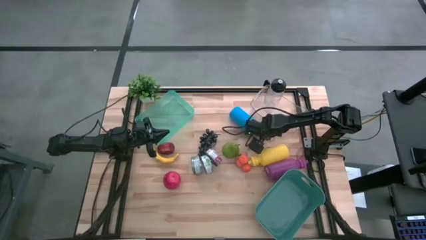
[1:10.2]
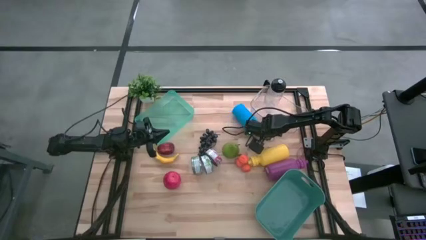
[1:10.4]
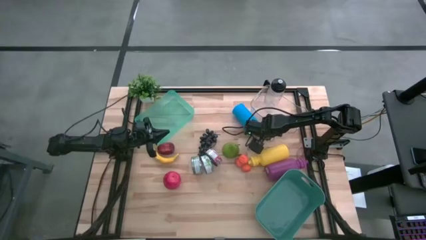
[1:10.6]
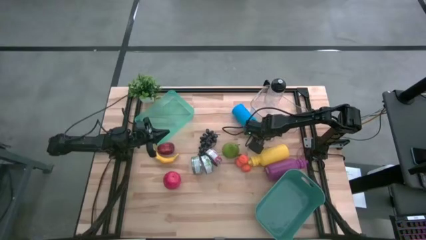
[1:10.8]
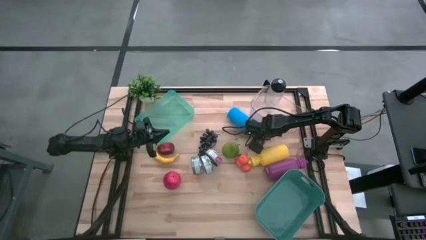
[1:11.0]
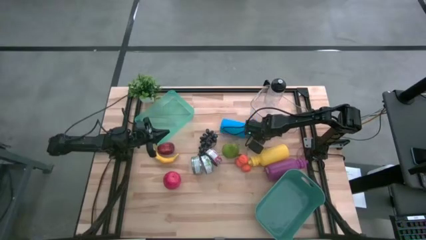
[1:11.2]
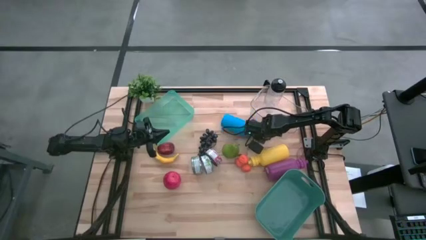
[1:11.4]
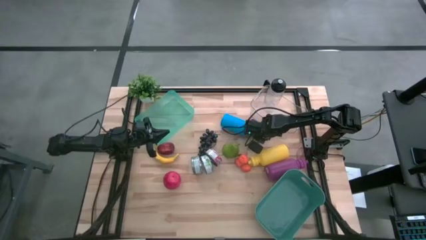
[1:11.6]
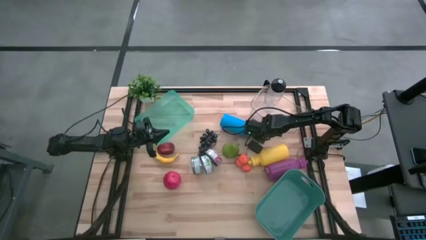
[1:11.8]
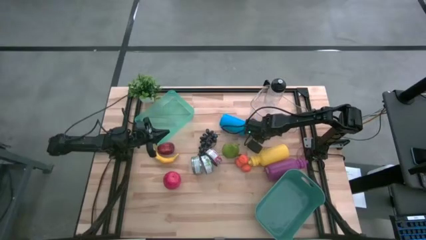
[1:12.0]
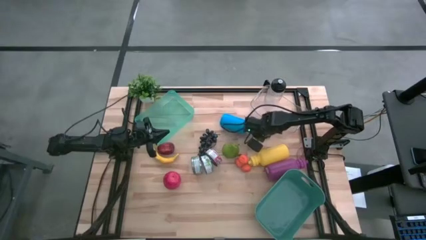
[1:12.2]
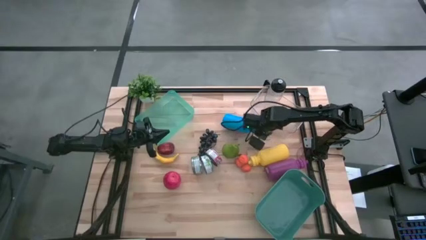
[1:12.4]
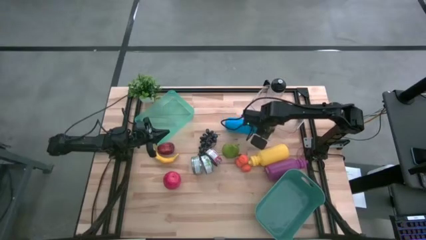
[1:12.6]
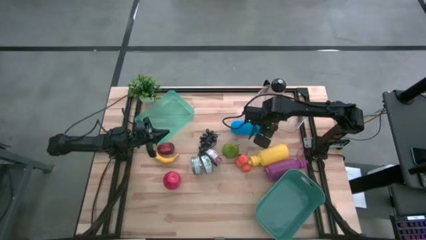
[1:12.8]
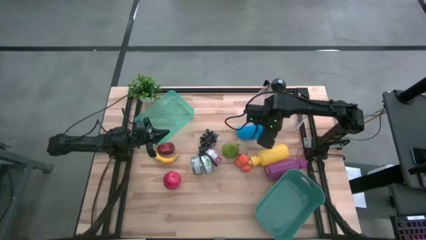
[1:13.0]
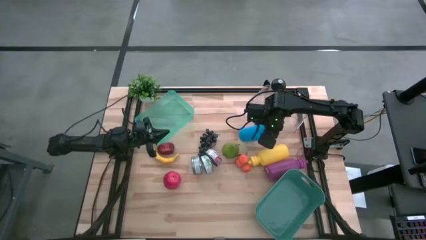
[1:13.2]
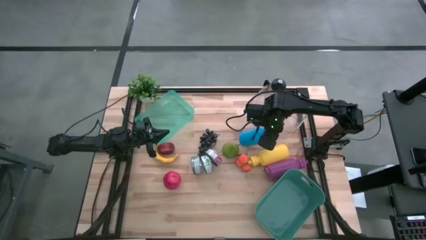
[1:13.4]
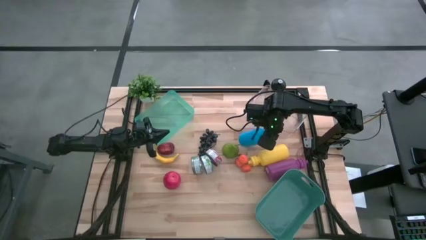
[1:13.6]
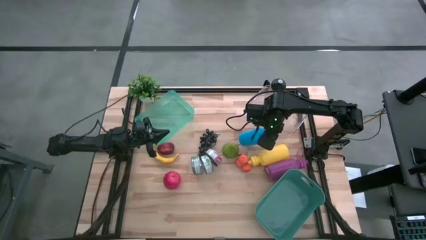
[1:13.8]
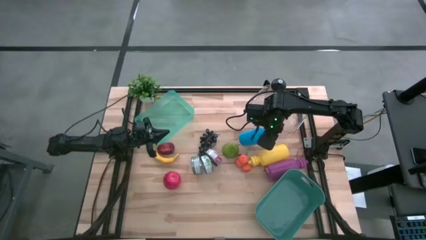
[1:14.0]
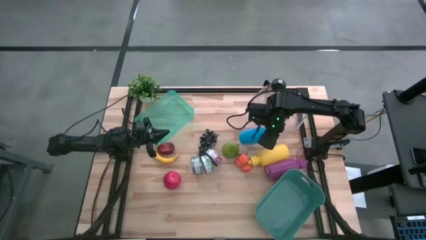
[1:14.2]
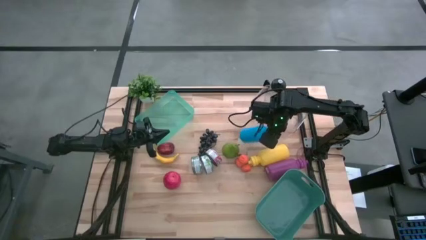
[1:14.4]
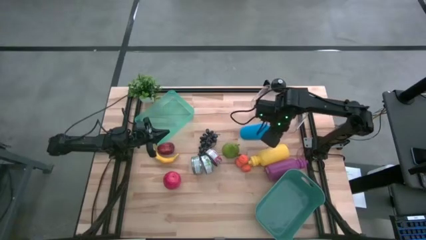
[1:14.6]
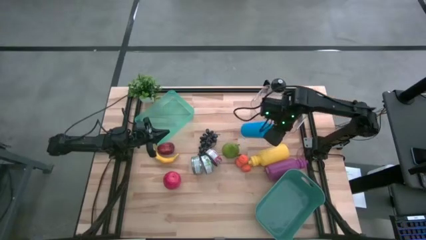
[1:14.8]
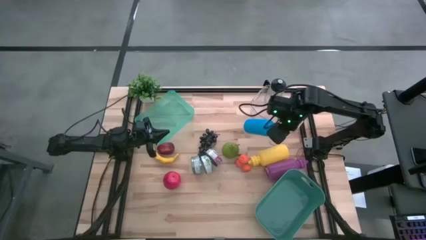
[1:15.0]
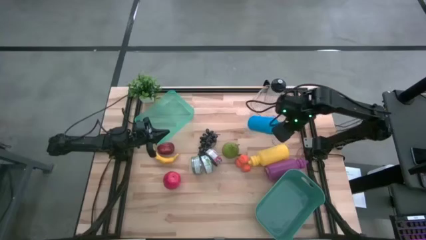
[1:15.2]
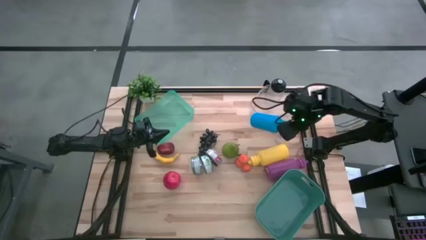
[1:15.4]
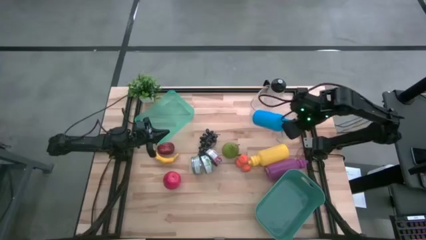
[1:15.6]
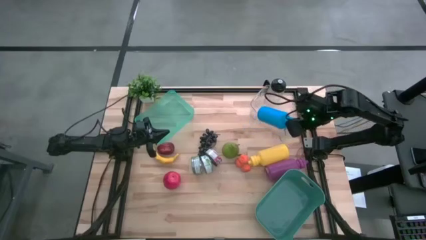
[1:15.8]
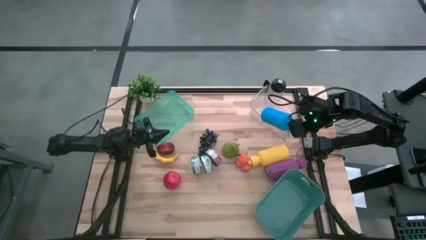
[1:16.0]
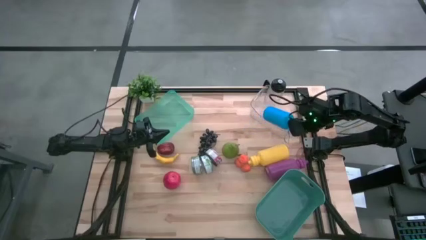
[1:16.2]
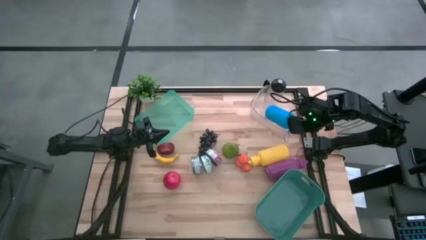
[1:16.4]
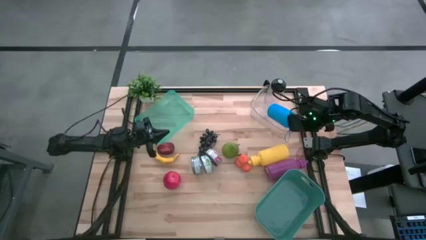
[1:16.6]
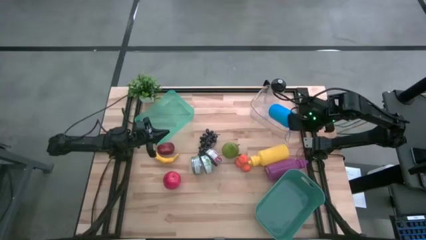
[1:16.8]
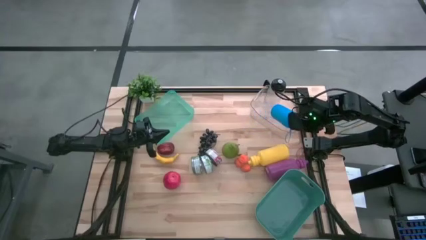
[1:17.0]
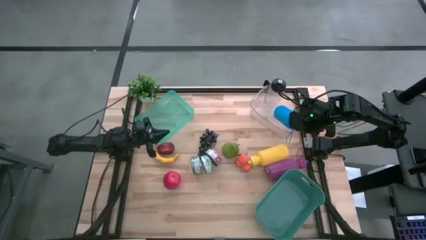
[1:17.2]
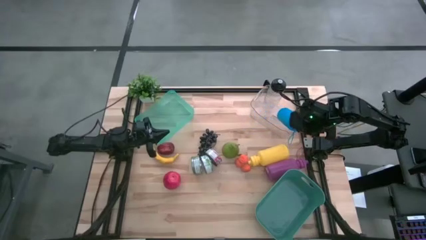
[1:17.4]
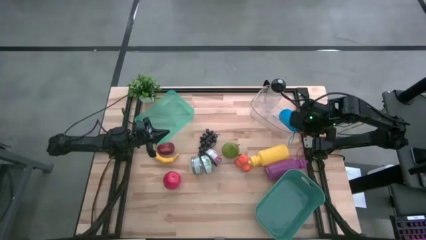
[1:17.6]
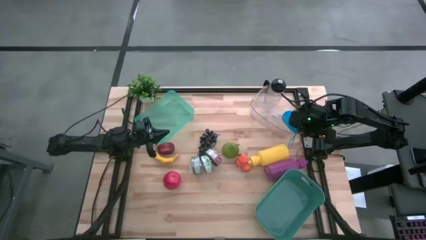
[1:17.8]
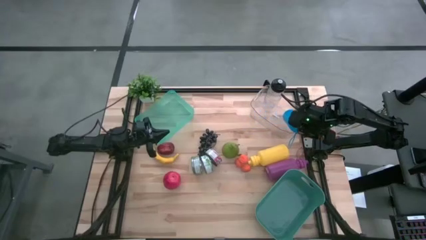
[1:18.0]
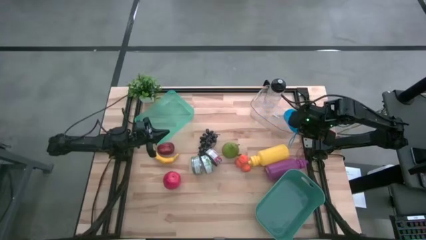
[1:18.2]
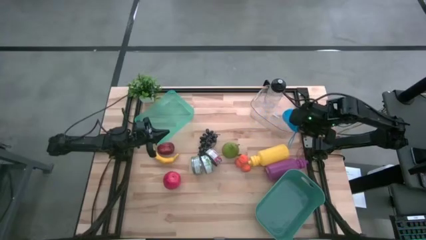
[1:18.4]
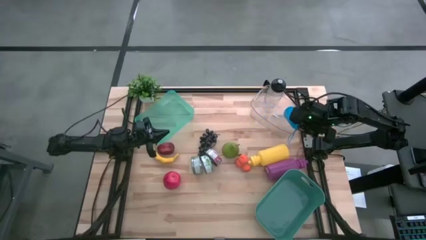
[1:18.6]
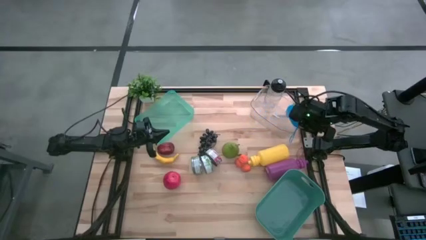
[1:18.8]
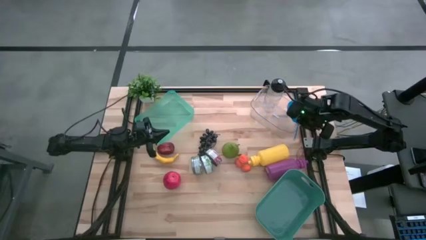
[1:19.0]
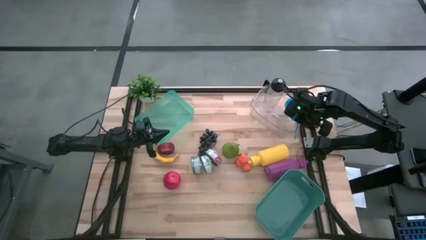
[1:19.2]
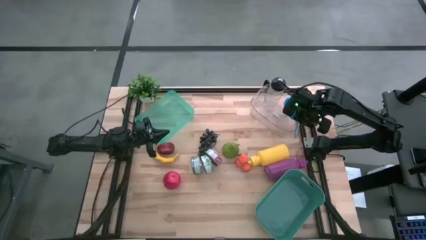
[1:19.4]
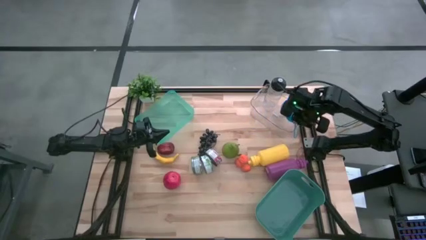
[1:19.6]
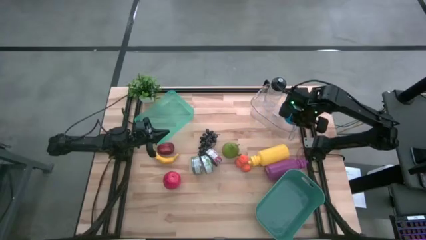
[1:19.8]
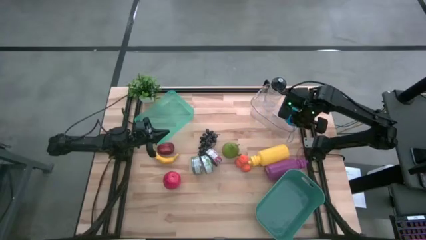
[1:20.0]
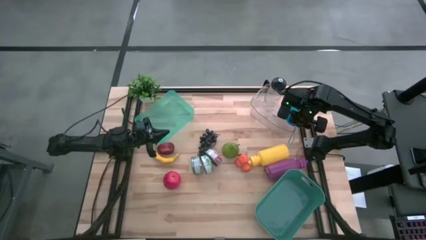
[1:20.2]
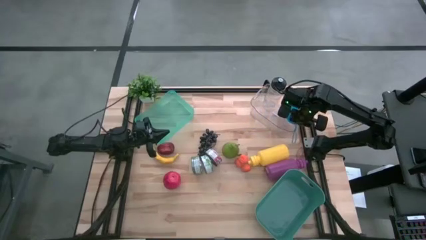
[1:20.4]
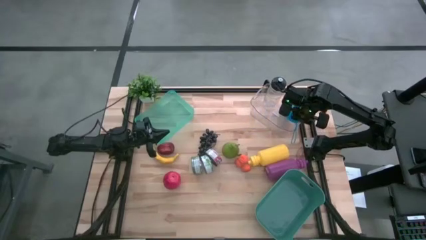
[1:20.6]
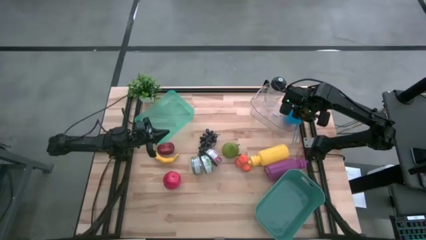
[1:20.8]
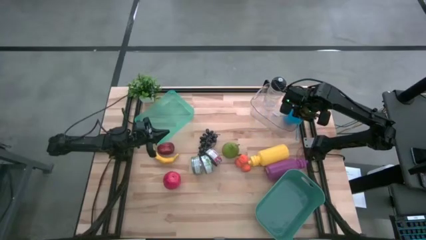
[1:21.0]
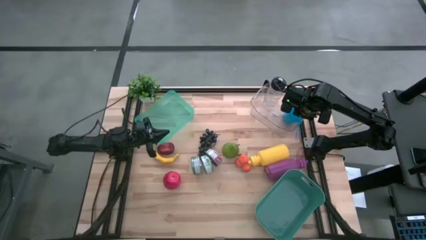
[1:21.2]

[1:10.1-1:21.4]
Task: Pick & Place Food Item
Put the blue water bottle into the transparent bin

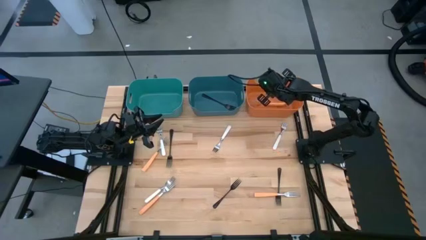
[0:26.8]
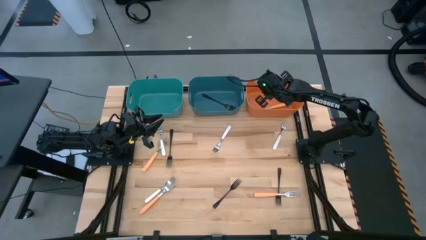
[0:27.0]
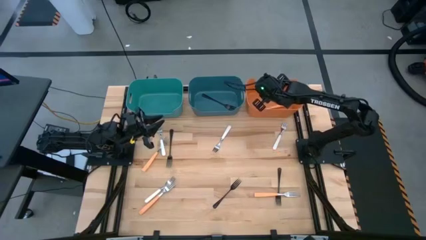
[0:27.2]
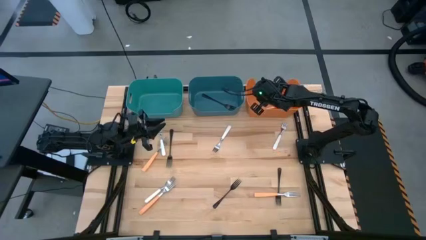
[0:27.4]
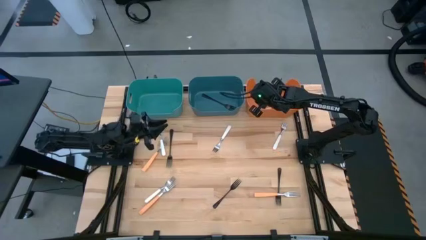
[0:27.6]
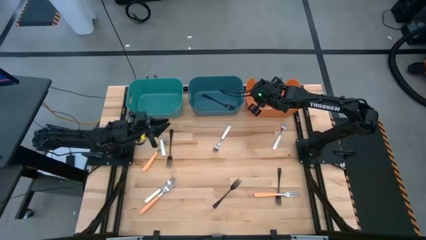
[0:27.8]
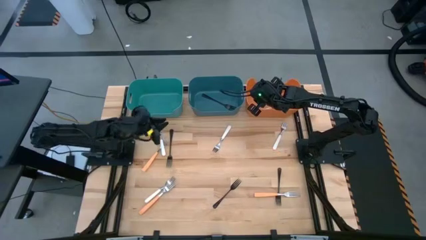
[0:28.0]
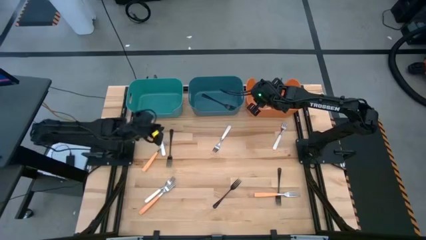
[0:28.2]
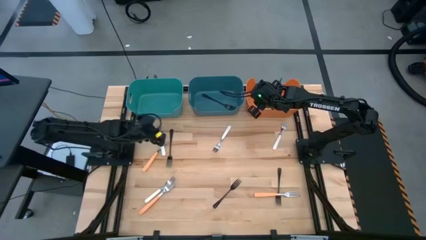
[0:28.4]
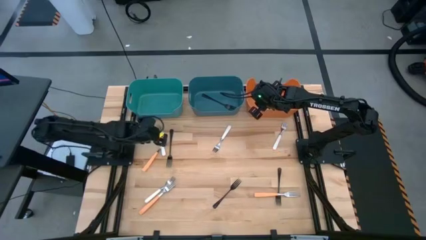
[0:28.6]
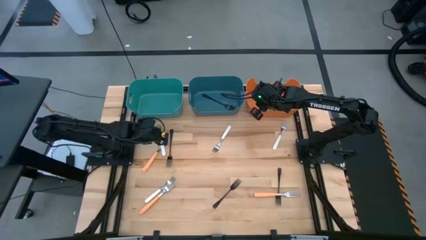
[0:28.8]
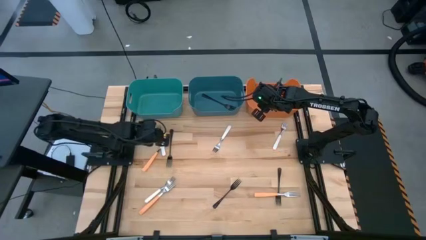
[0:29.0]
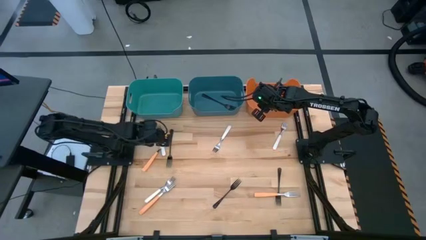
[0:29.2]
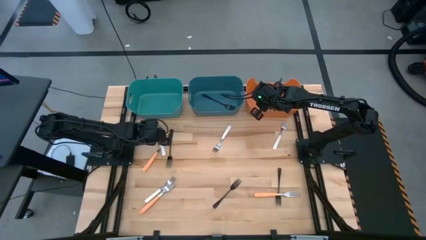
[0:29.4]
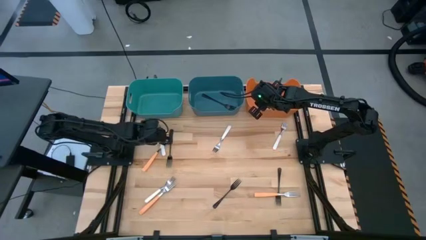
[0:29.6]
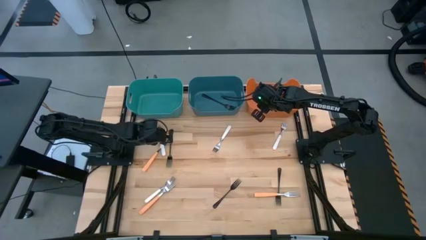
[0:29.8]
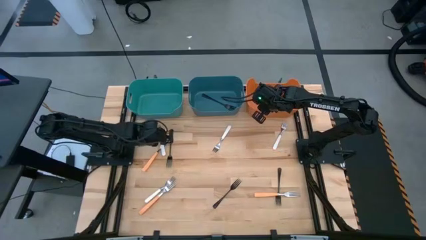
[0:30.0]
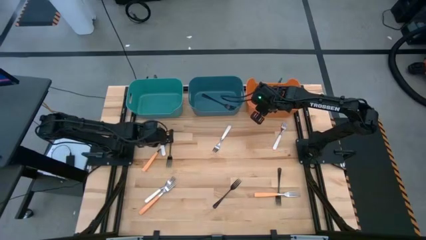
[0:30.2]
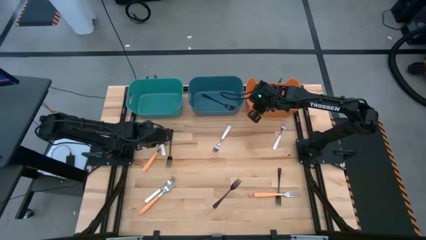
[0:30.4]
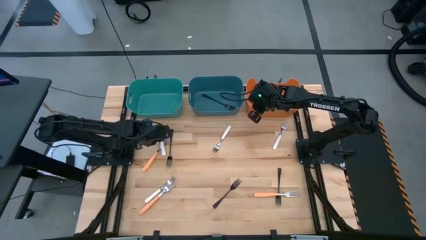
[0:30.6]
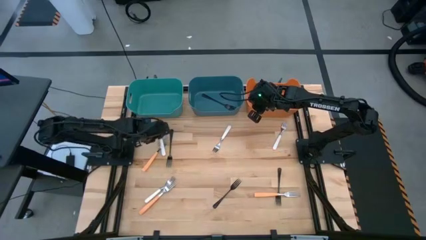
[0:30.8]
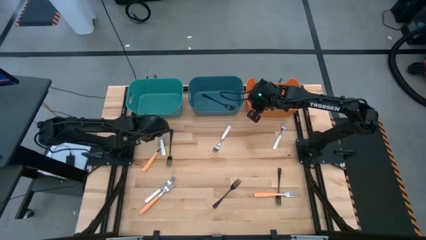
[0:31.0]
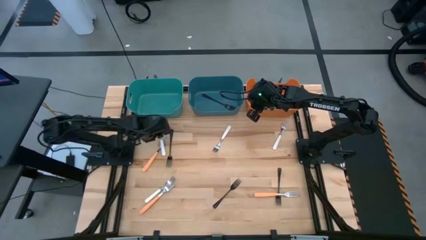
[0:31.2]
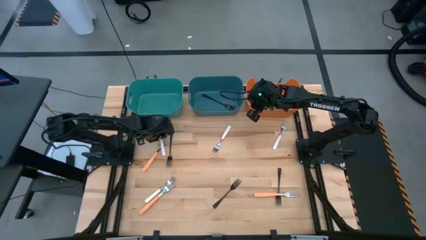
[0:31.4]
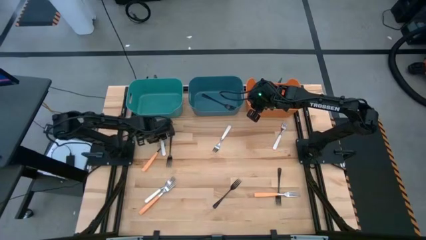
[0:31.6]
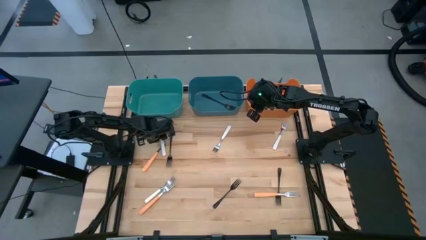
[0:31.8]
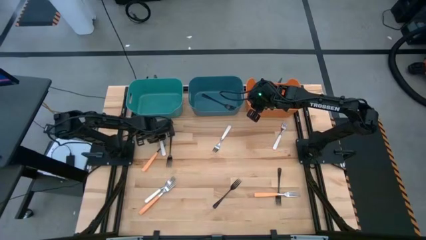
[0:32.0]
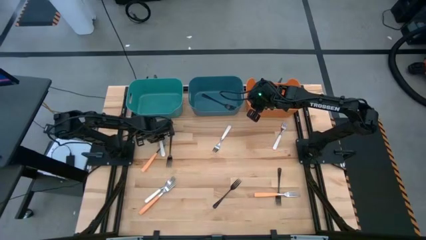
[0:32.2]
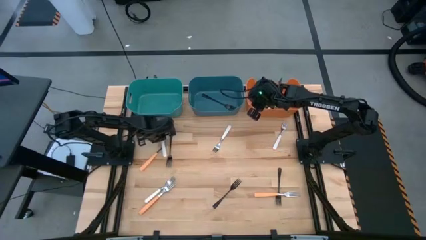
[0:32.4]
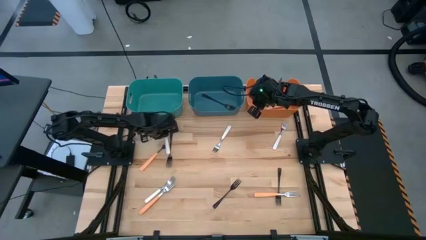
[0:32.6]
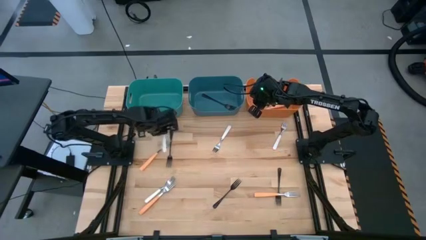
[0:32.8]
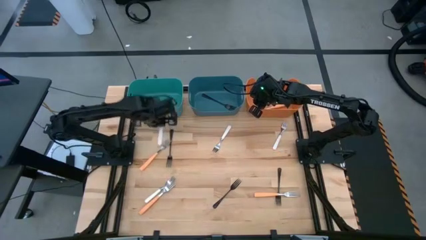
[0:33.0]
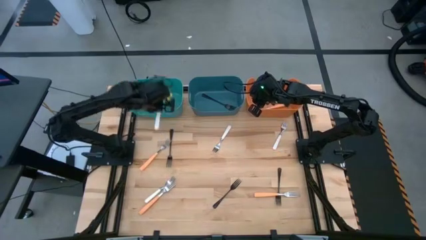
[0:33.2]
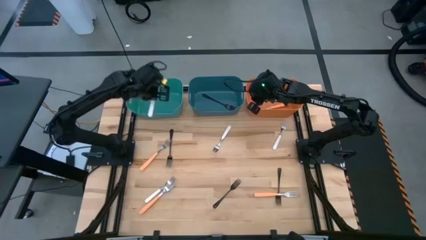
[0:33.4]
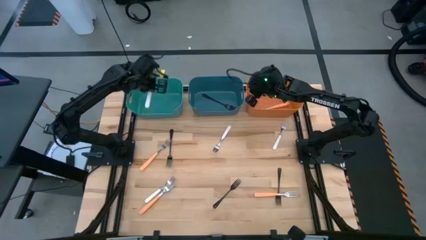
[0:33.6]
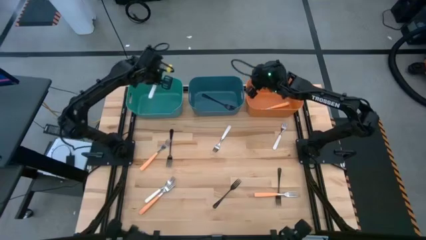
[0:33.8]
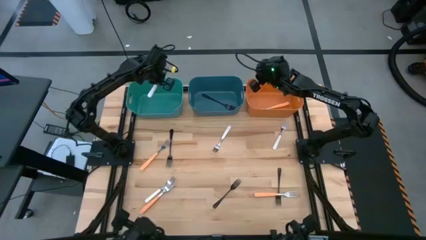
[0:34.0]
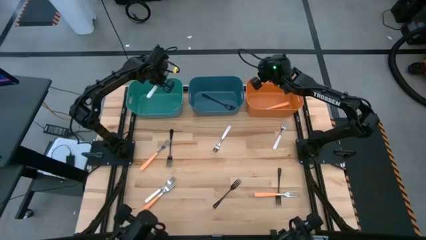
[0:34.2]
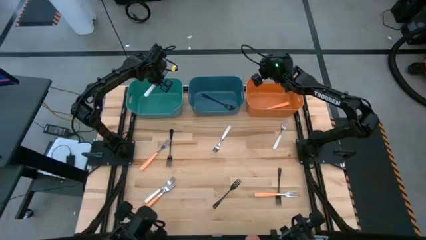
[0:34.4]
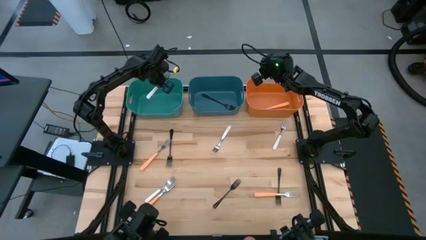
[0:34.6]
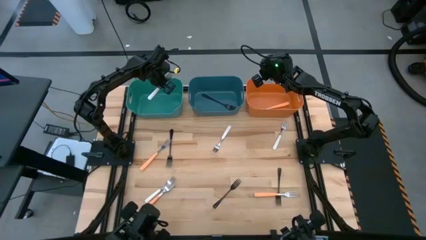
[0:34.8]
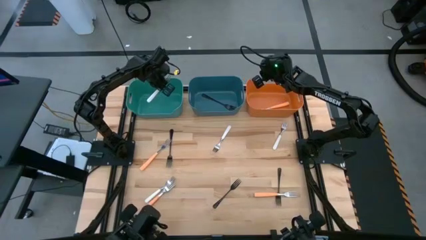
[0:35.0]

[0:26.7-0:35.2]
Task: Sort silverware by color (type)
Put the white fork into the green bin
